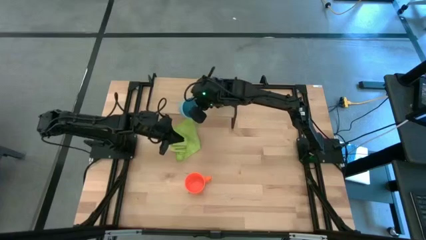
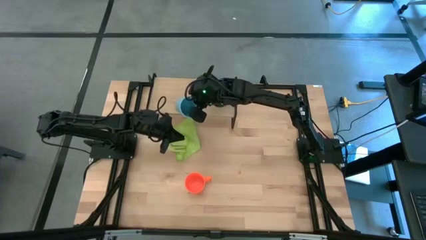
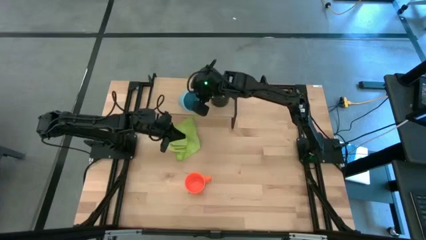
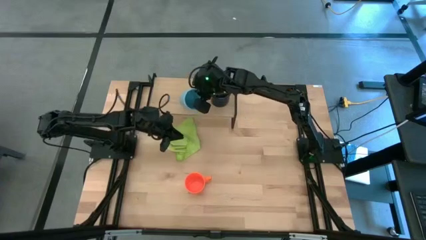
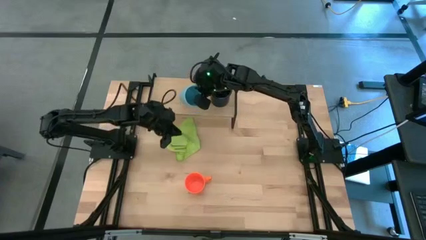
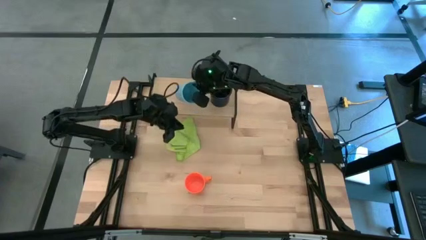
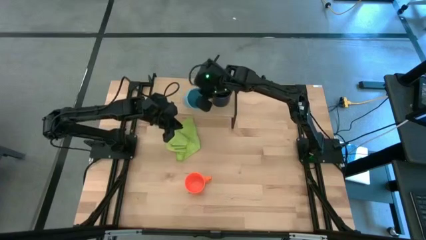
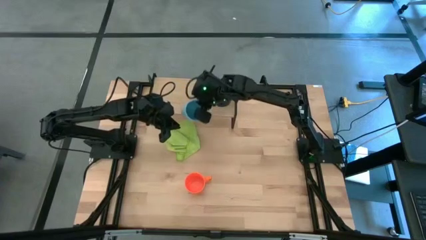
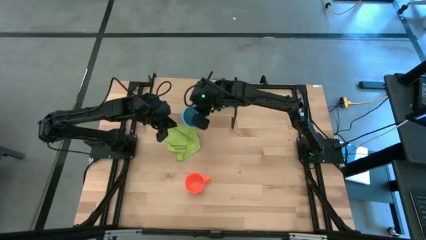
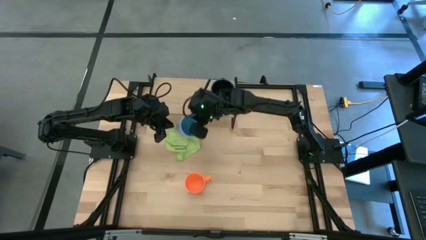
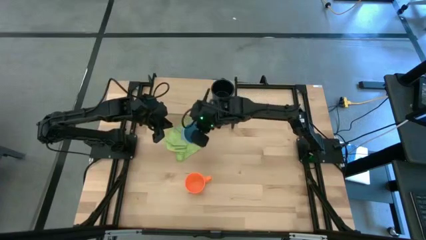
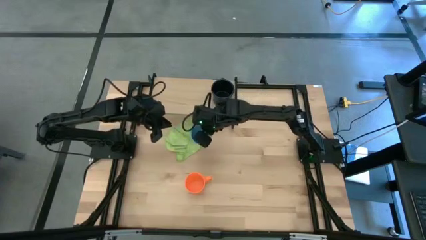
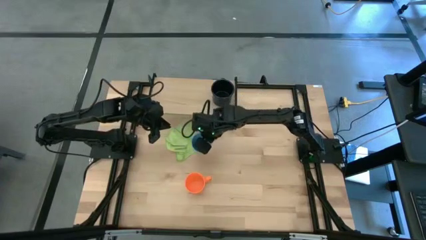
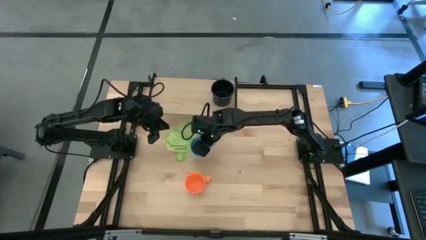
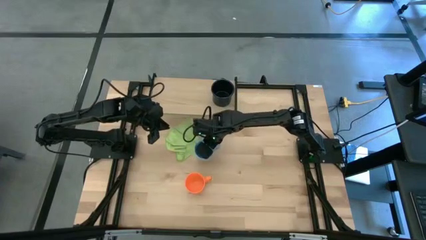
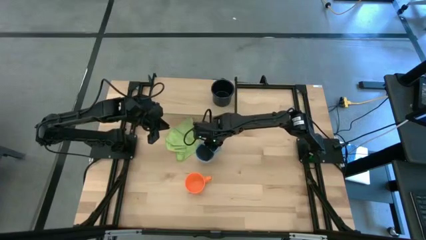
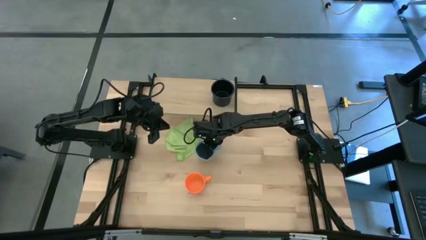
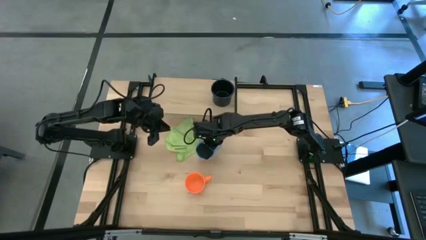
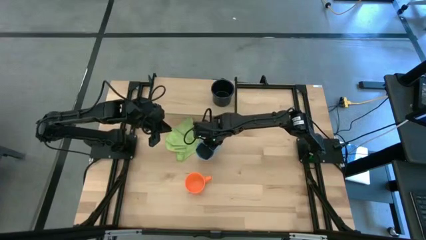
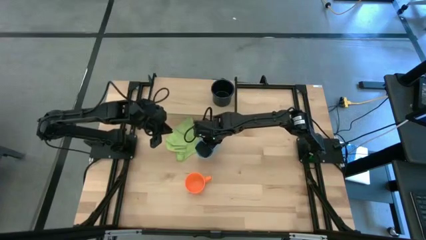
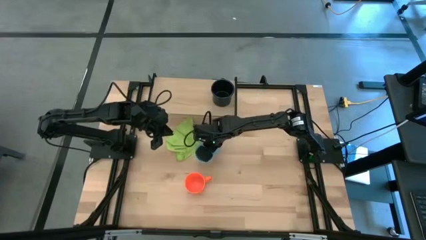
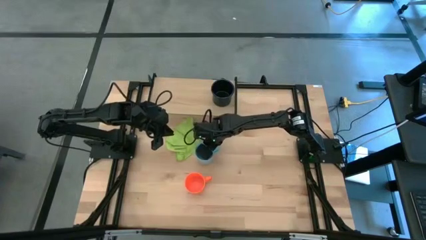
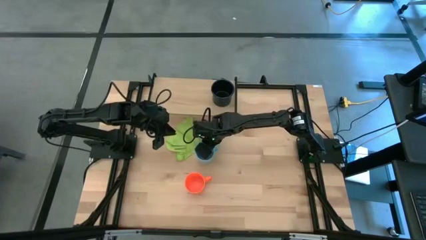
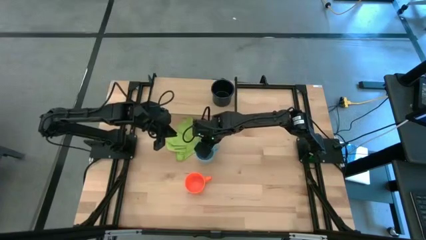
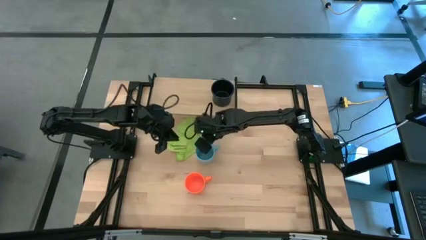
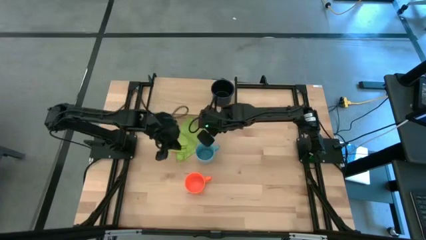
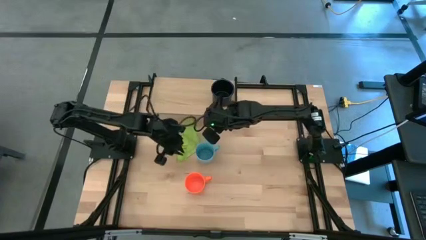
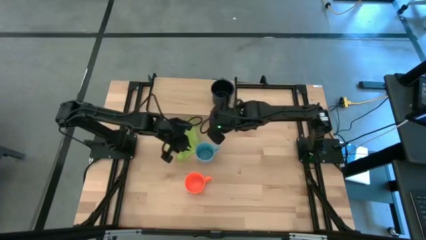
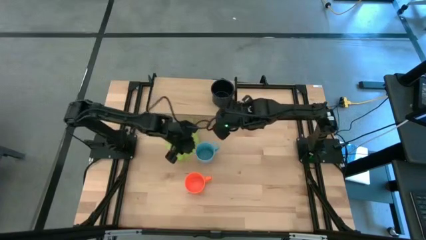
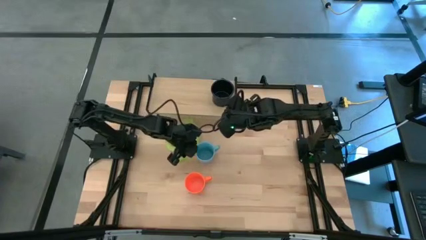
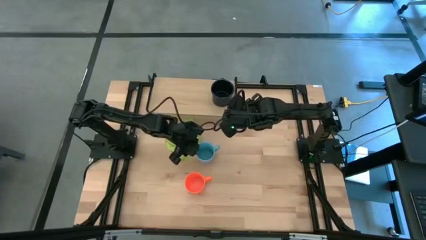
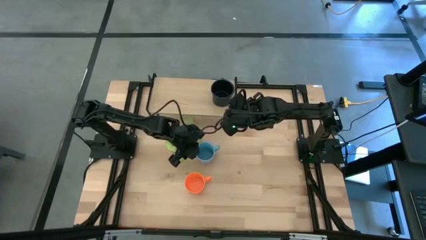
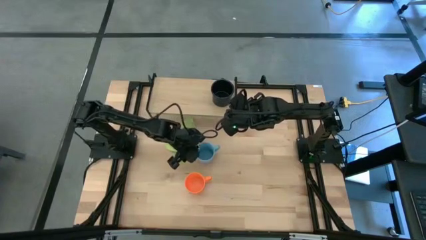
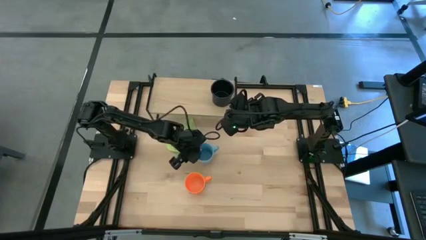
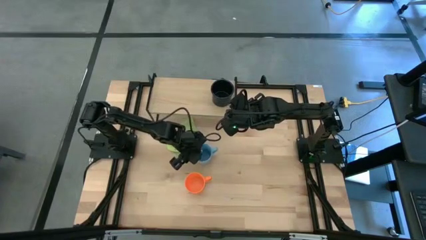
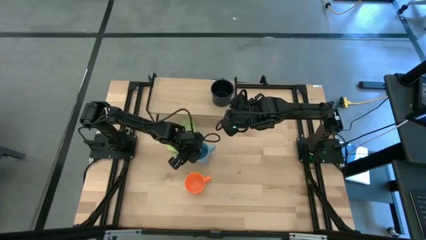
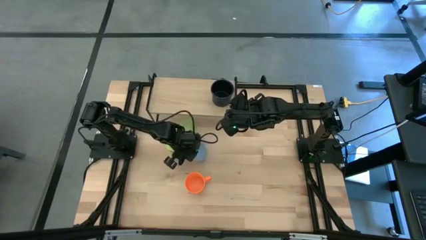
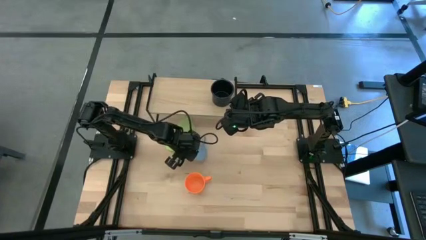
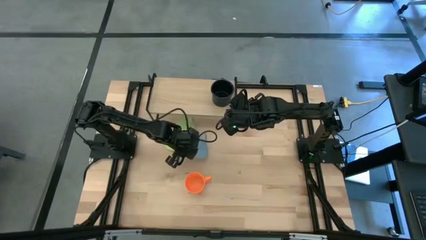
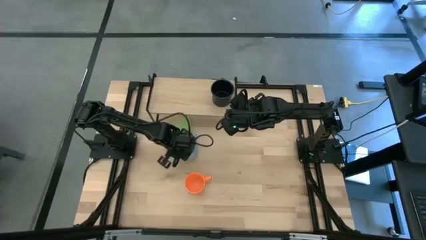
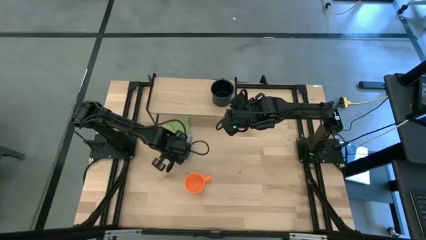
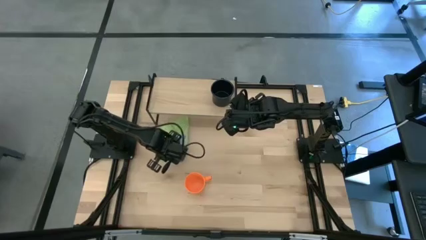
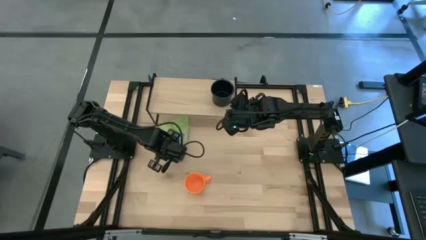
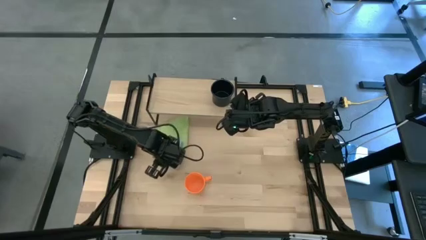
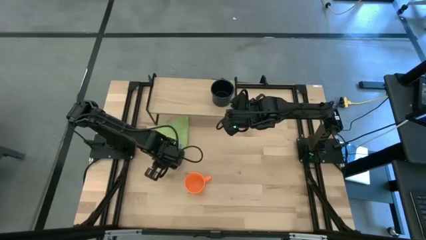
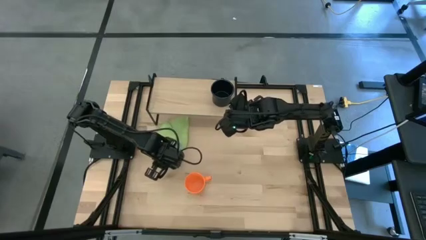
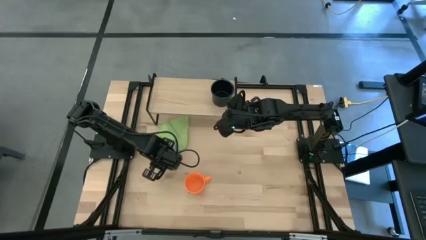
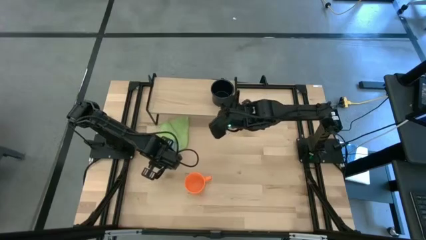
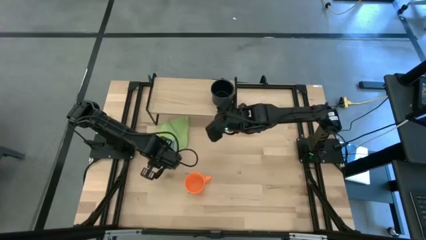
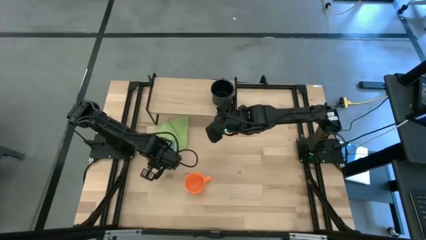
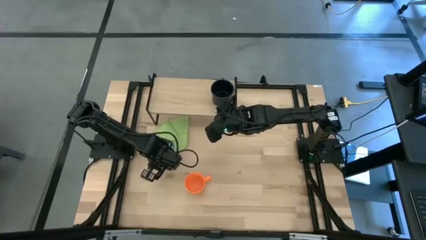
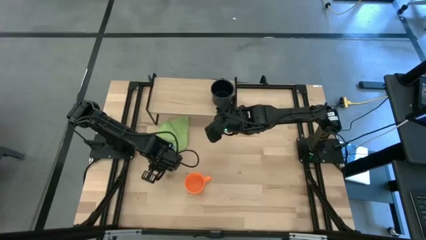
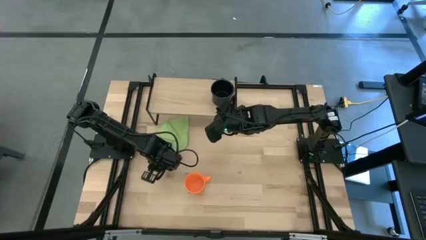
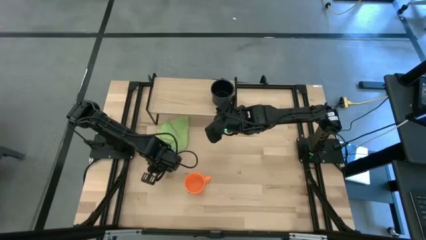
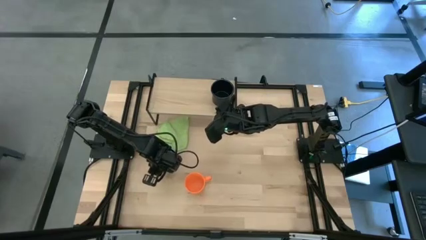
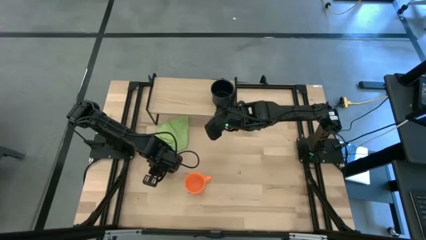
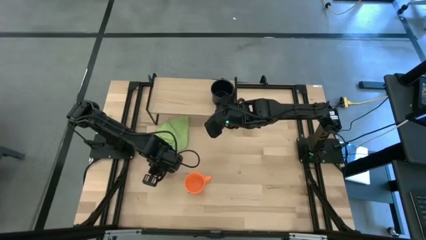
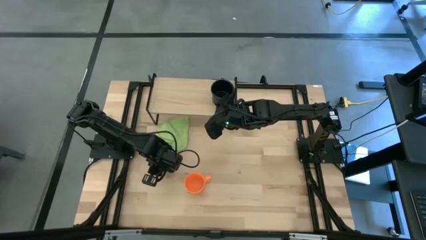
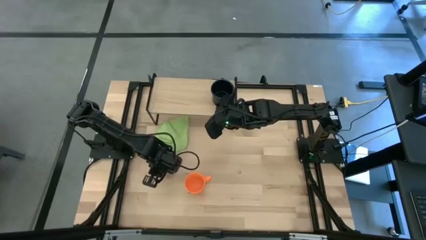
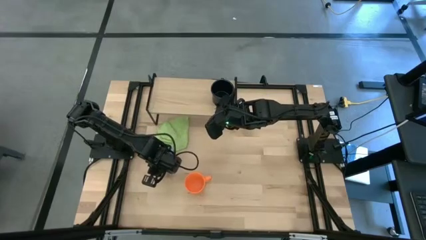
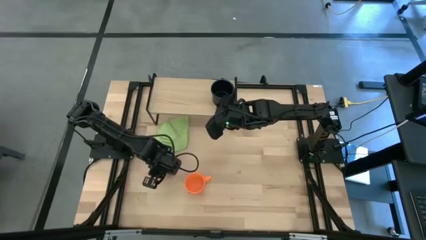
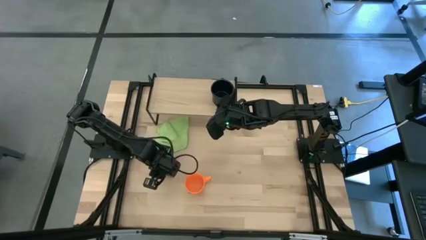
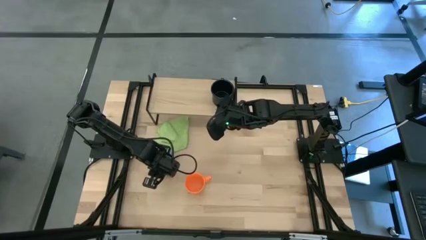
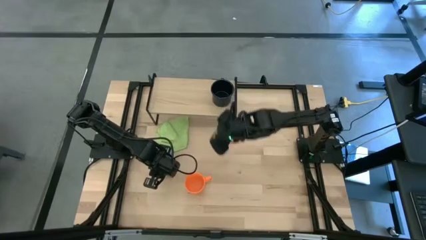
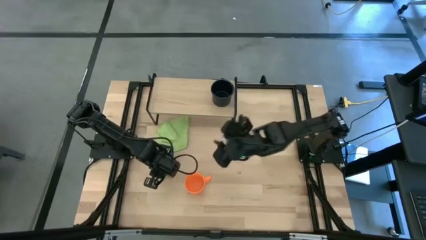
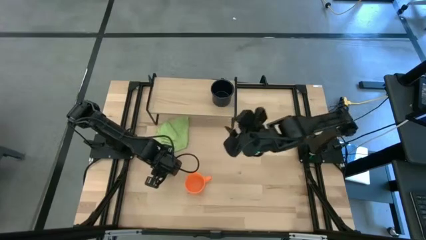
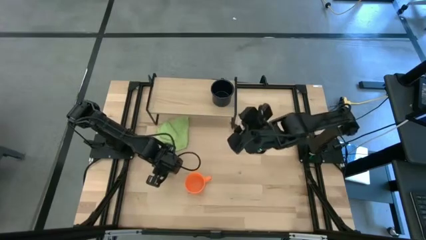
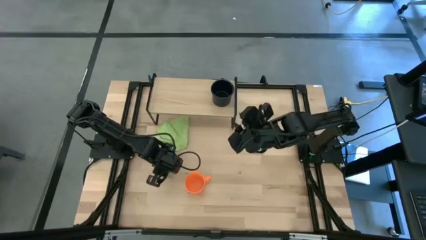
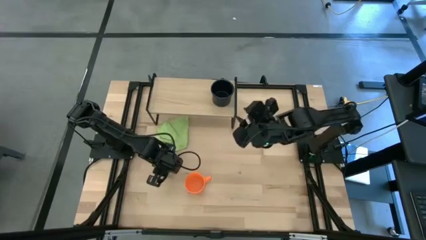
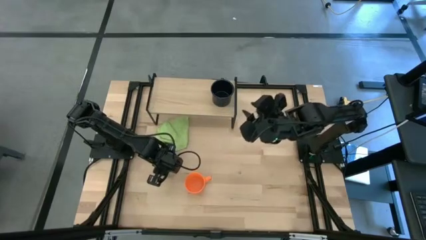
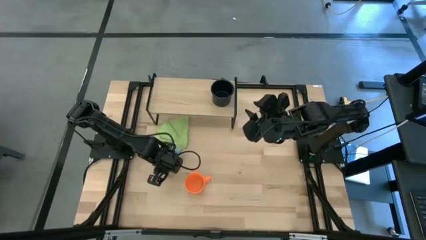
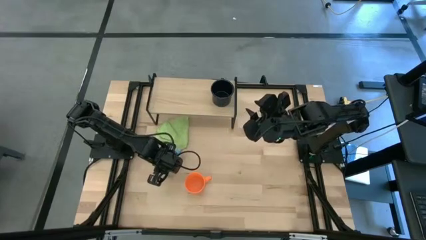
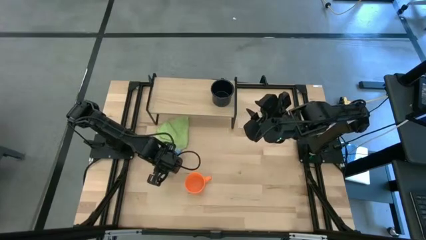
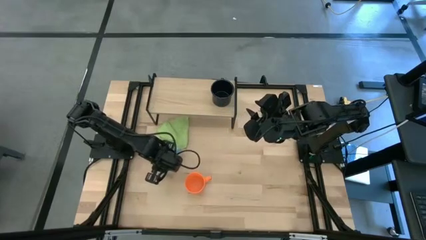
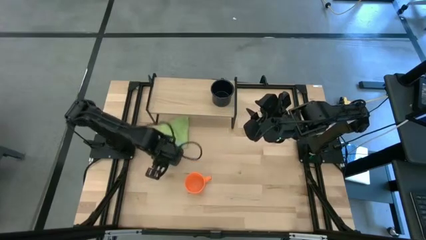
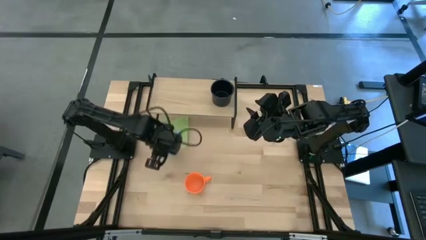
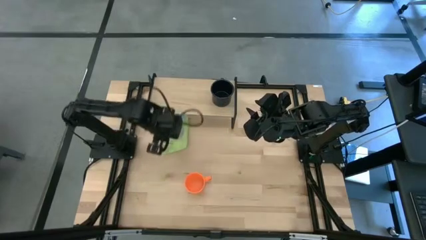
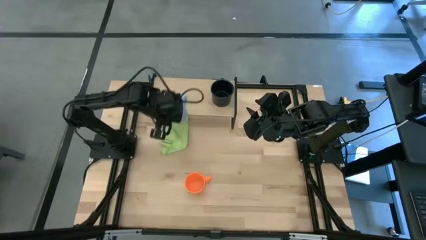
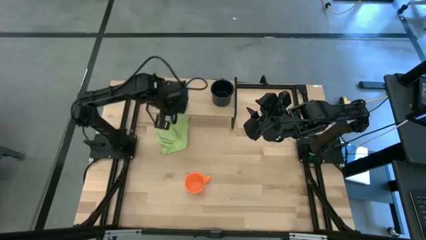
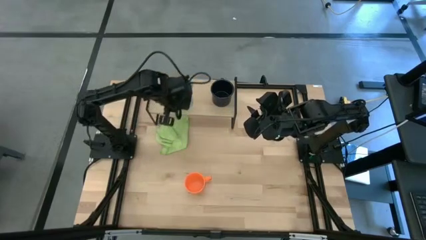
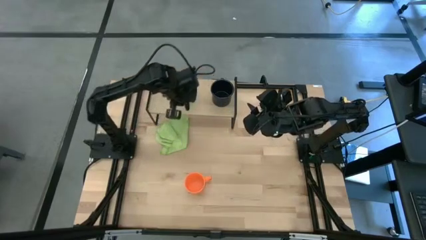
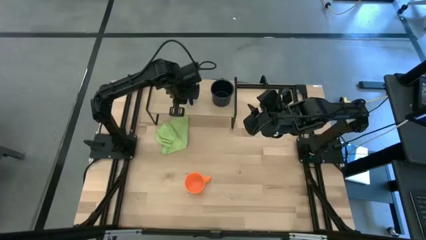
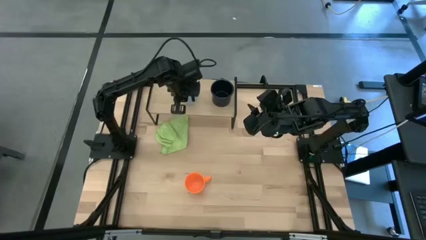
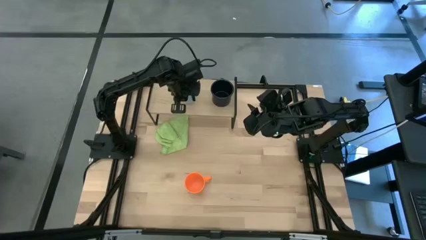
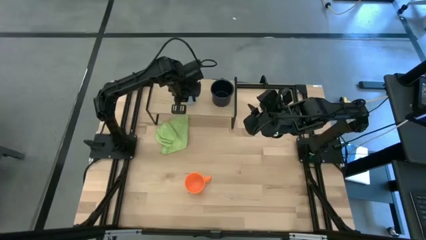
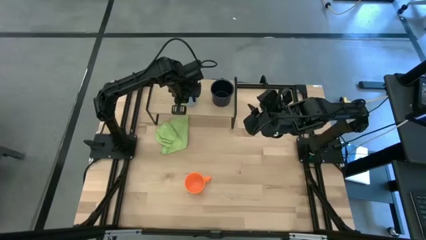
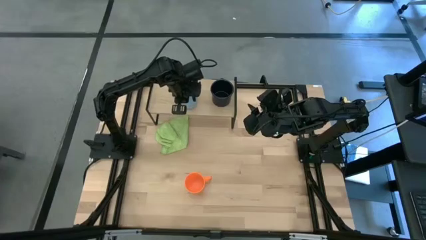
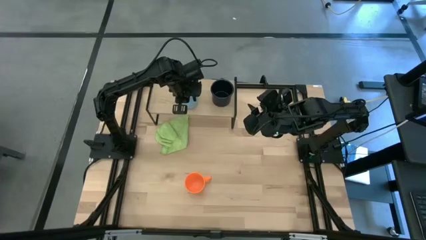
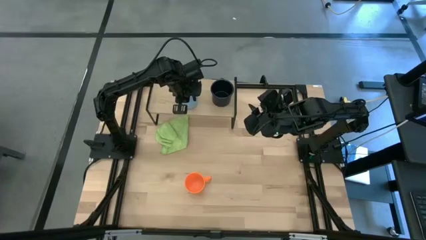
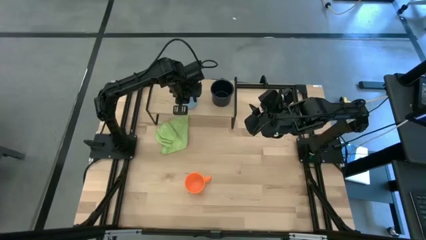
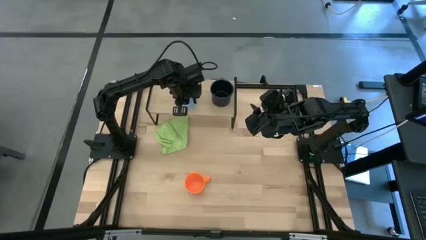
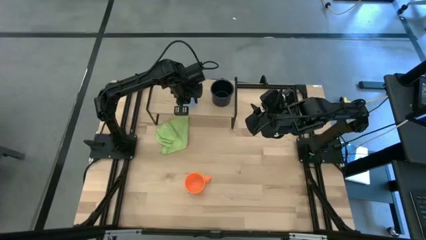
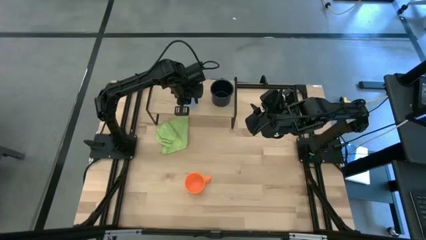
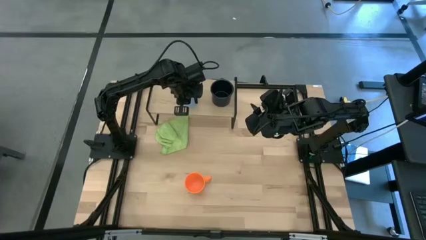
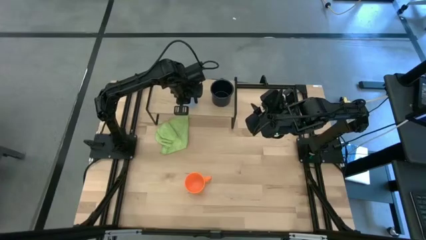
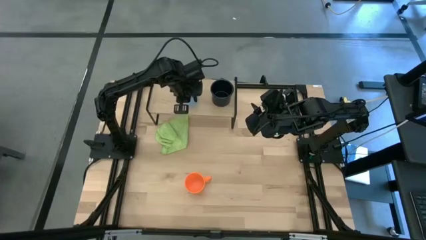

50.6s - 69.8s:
Task: Stack small to large cups/mugs on shelf
Put the blue mug on the shelf
